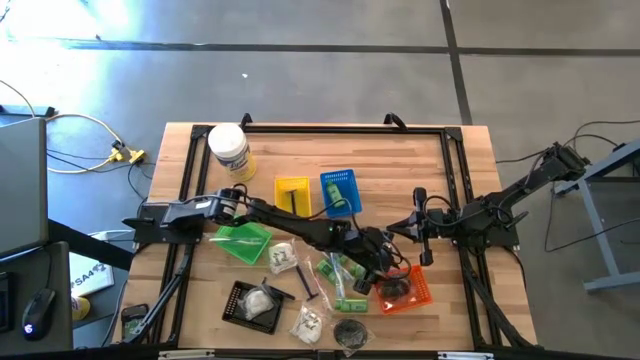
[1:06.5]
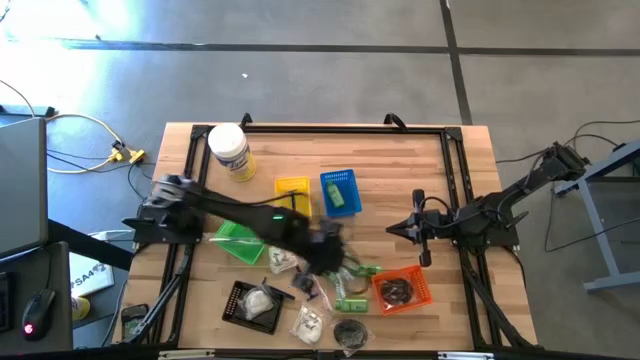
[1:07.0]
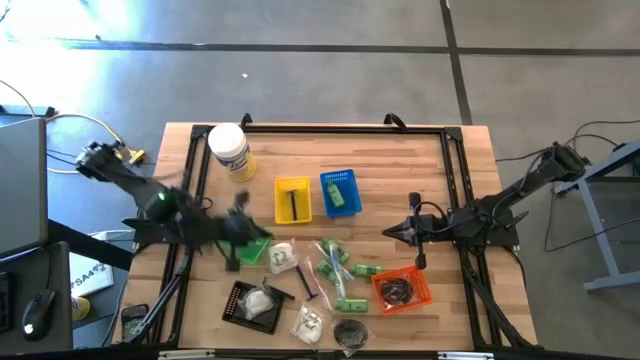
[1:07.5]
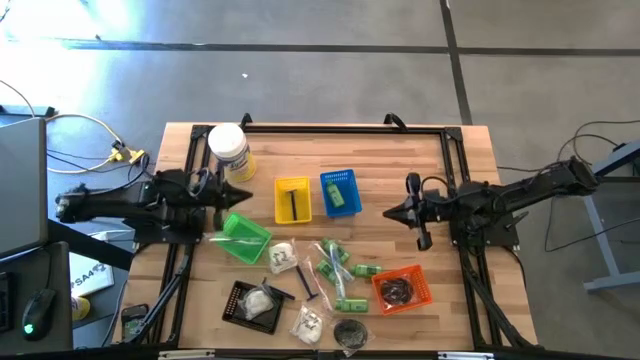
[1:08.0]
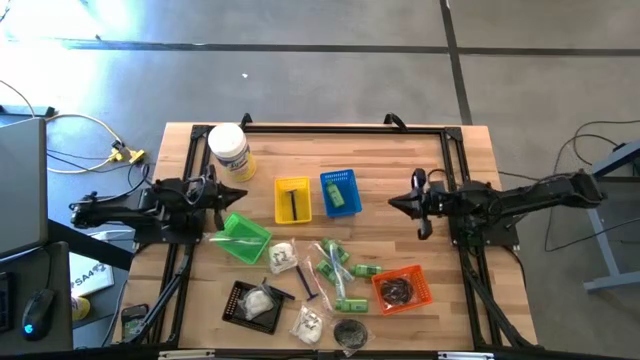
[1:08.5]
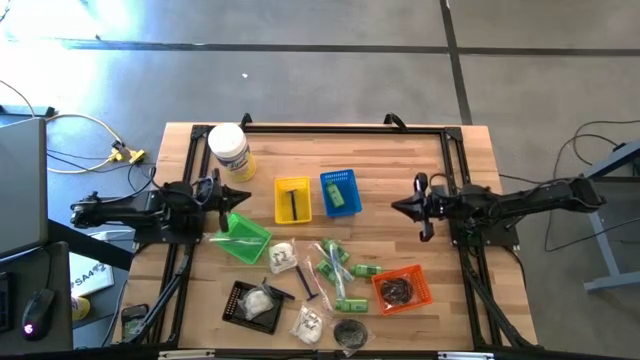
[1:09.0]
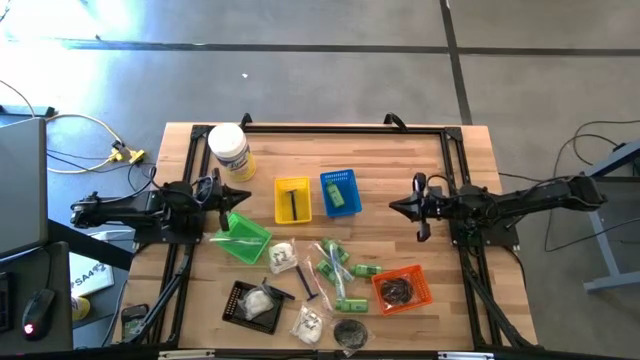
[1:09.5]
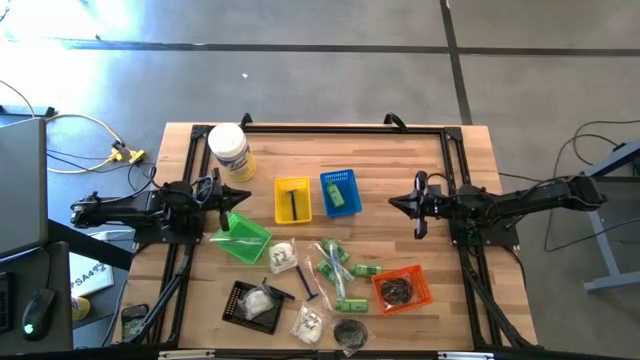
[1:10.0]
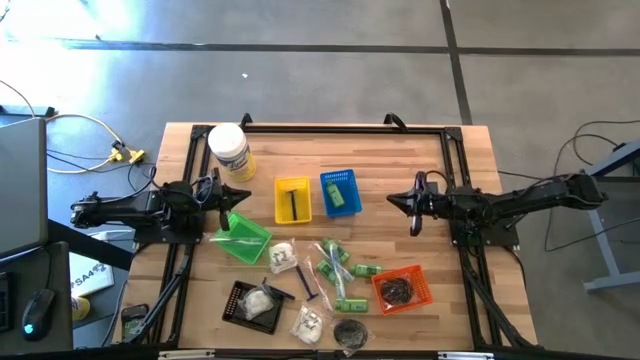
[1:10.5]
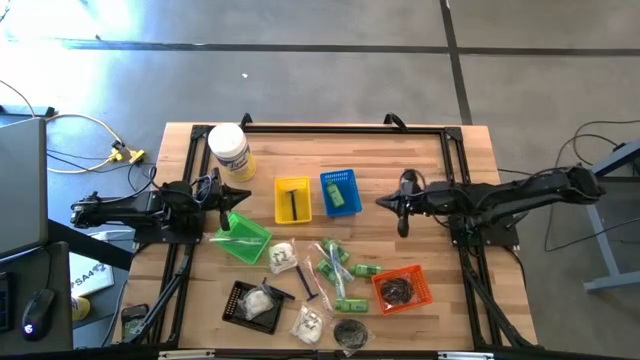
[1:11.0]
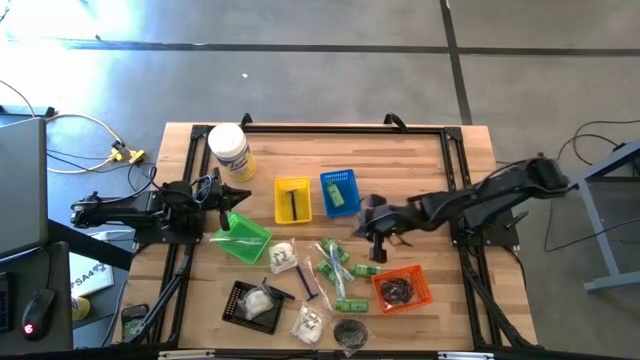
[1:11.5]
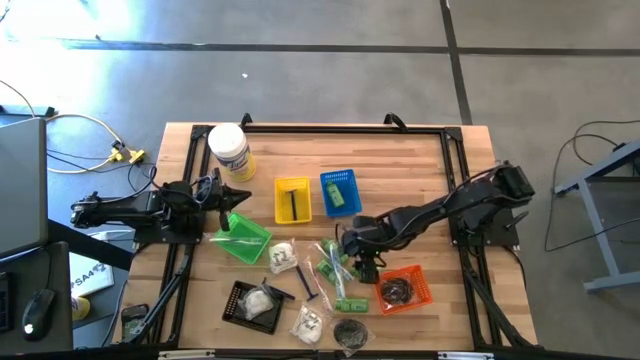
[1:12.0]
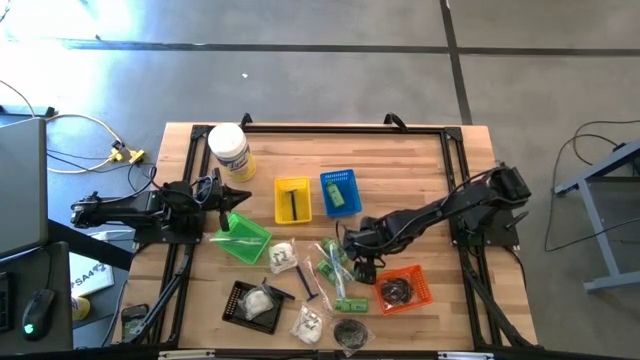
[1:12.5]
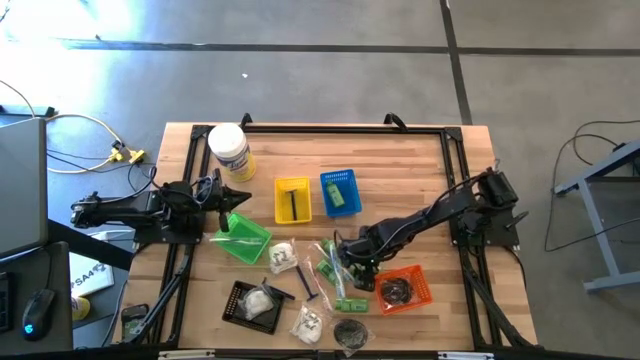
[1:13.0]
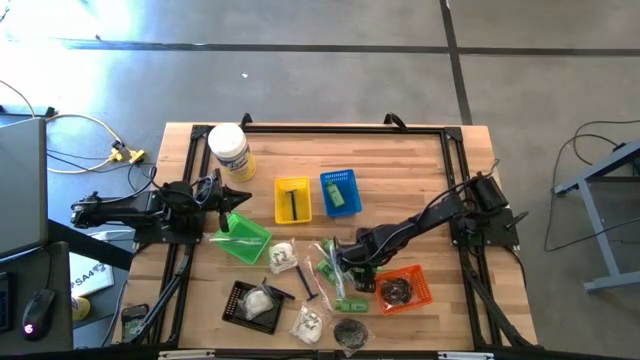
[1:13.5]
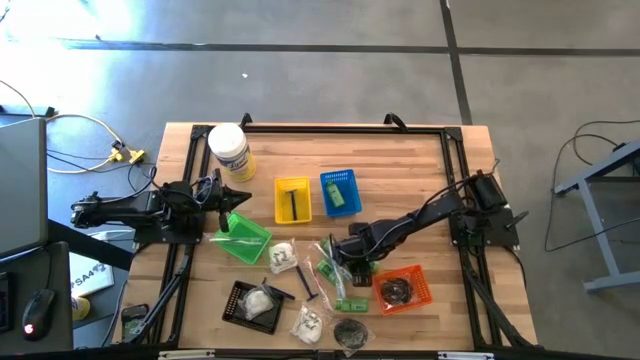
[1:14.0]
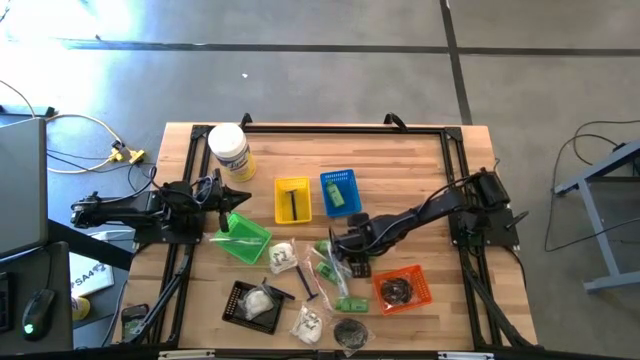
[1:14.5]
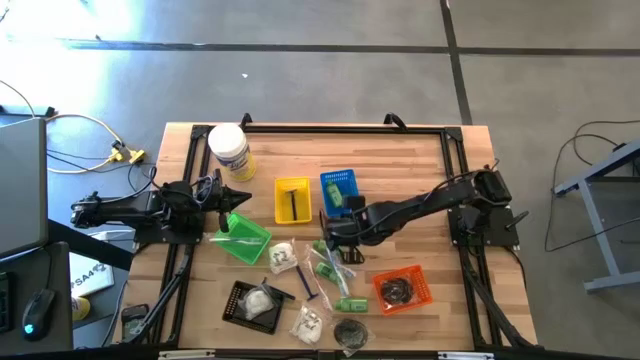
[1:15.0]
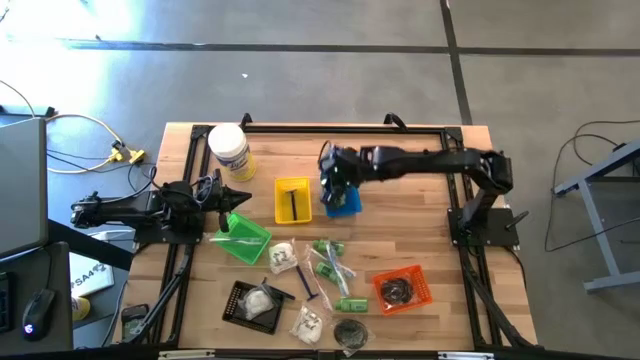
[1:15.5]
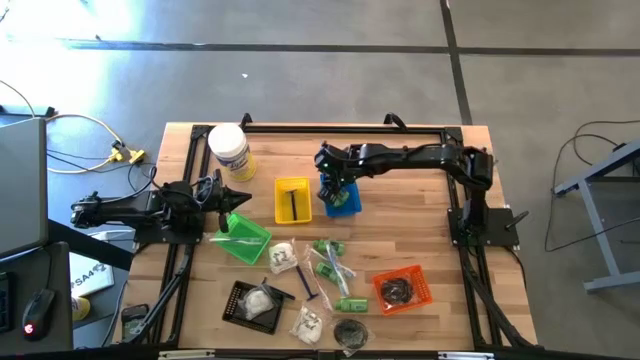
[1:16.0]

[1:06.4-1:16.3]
Task: Pick & Place Travel size toiletries
Put the shampoo into the blue bin

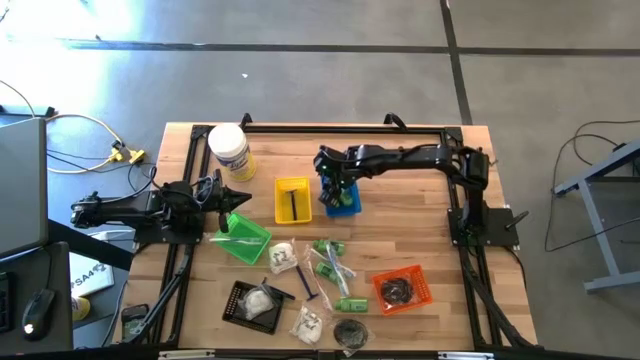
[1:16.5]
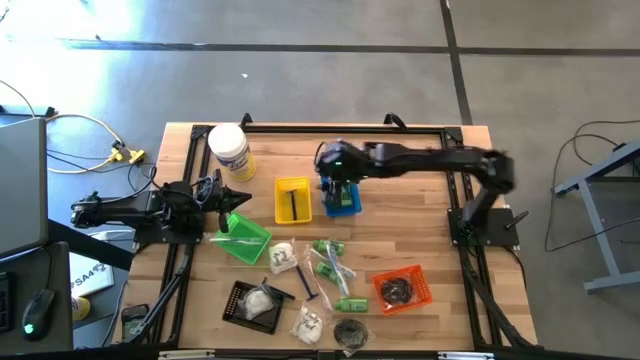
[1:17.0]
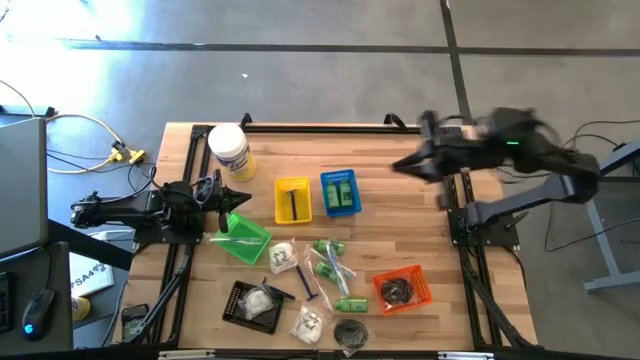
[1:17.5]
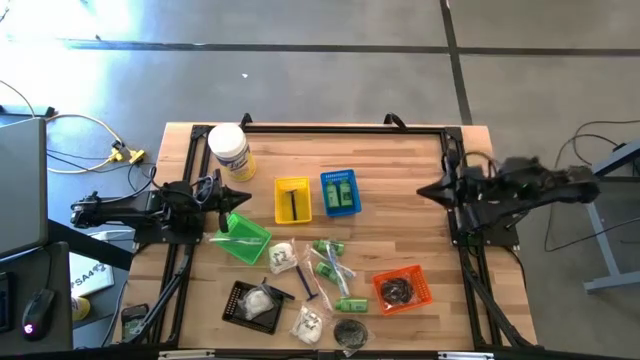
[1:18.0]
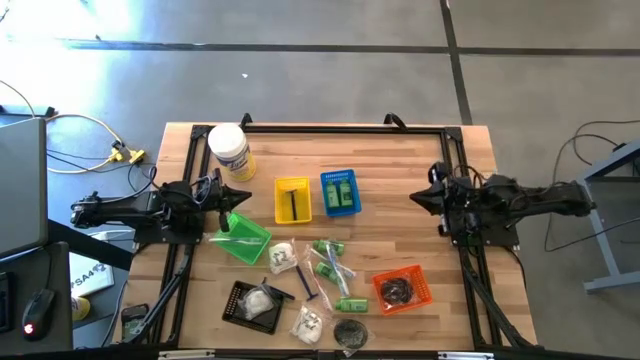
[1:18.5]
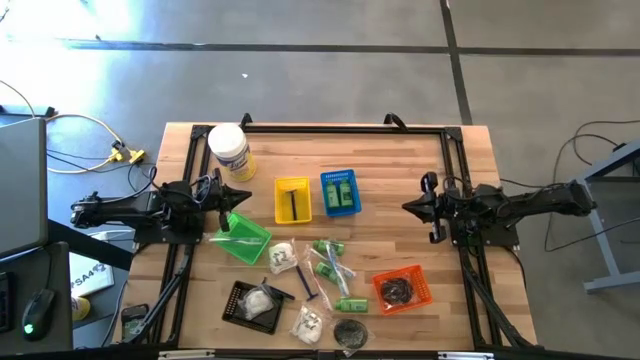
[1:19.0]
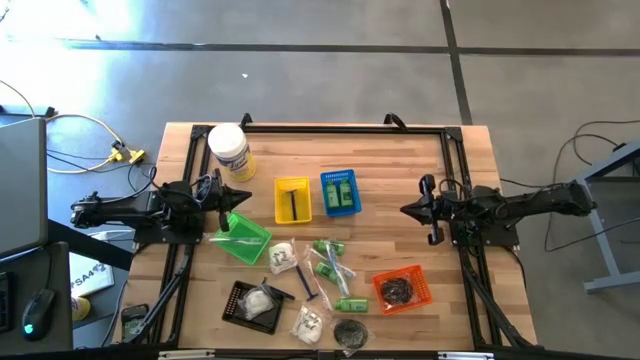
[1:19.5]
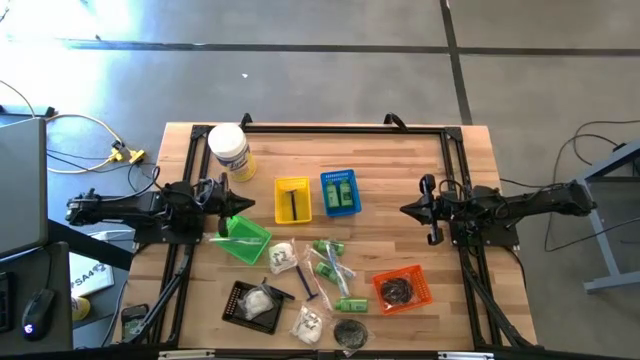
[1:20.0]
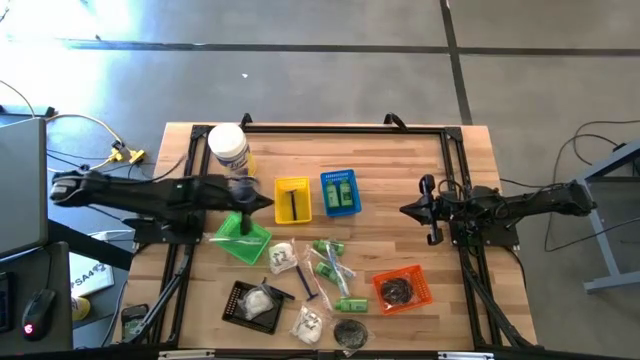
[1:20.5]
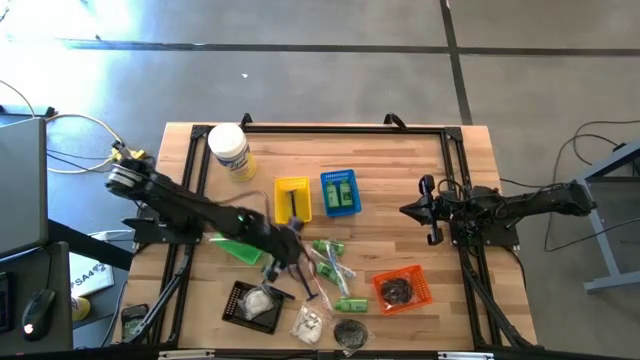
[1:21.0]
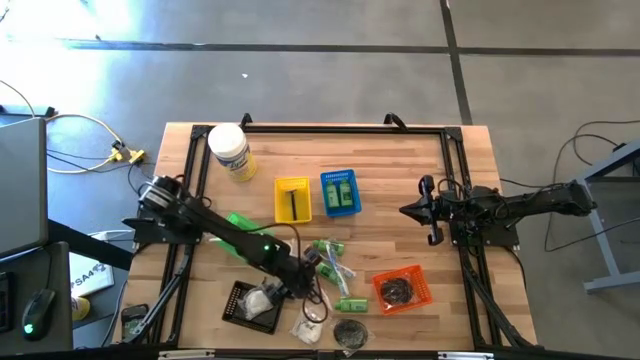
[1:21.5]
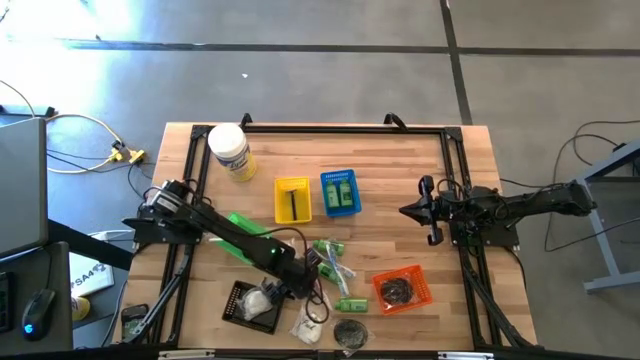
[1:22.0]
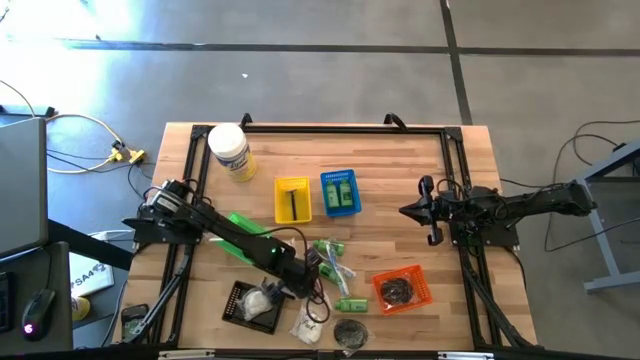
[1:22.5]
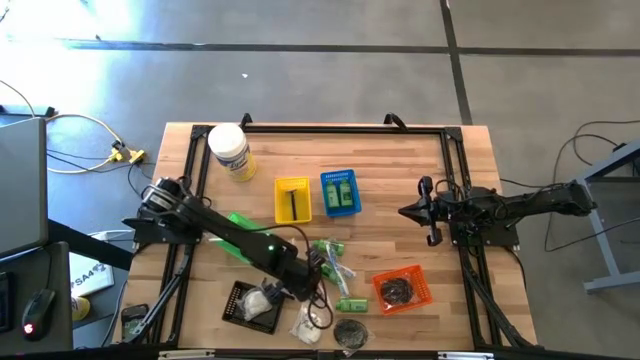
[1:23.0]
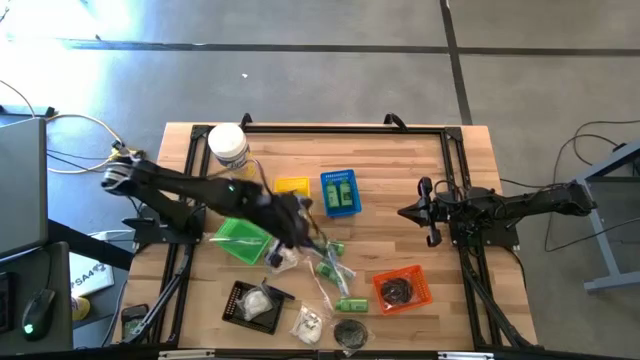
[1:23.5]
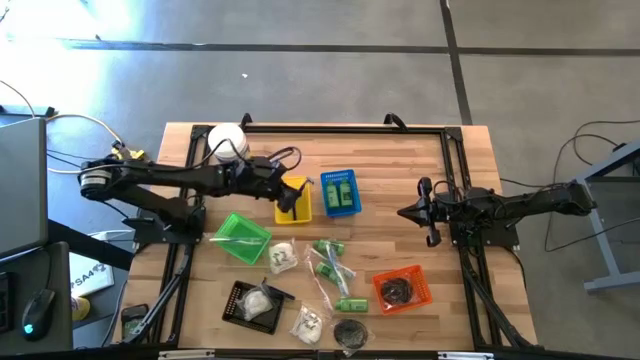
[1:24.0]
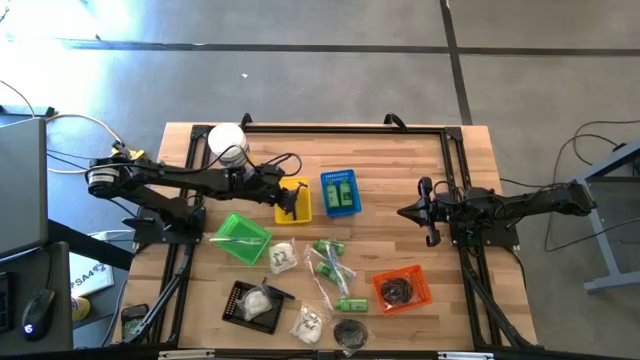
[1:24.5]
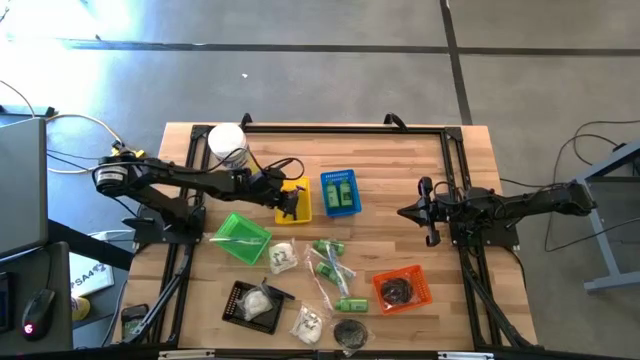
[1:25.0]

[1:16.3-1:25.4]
Put the razor into the yellow bin

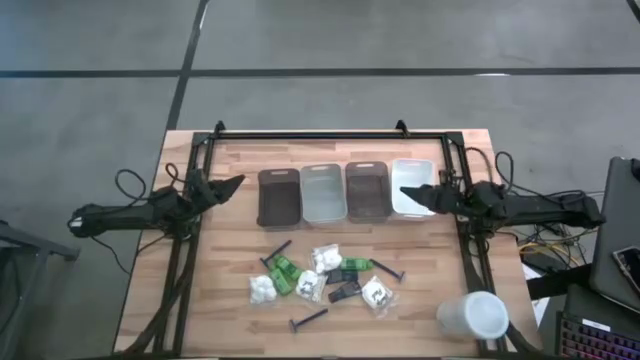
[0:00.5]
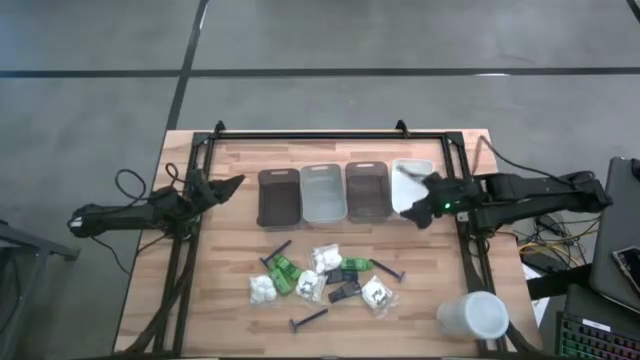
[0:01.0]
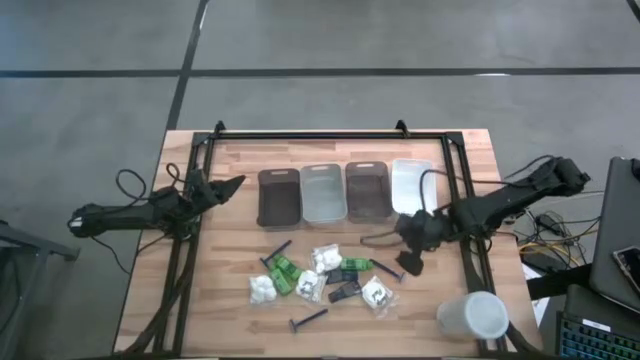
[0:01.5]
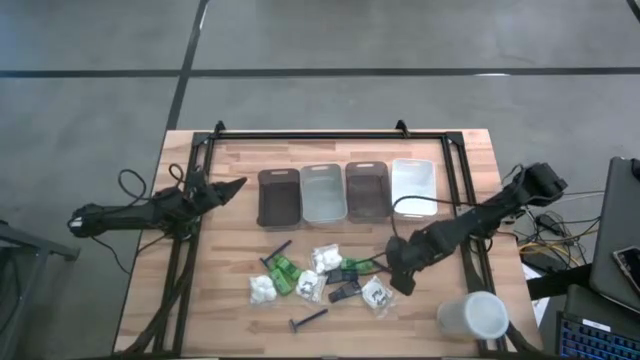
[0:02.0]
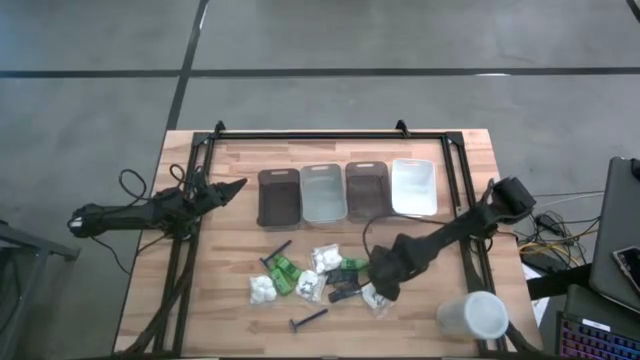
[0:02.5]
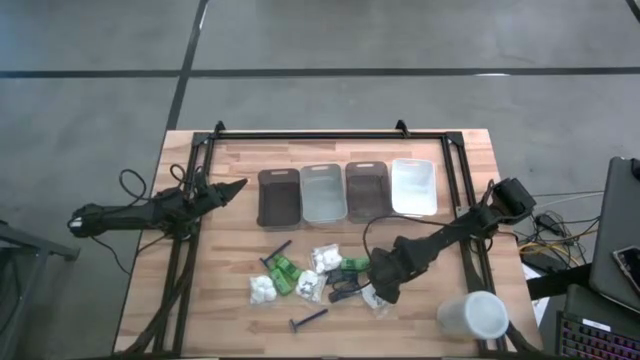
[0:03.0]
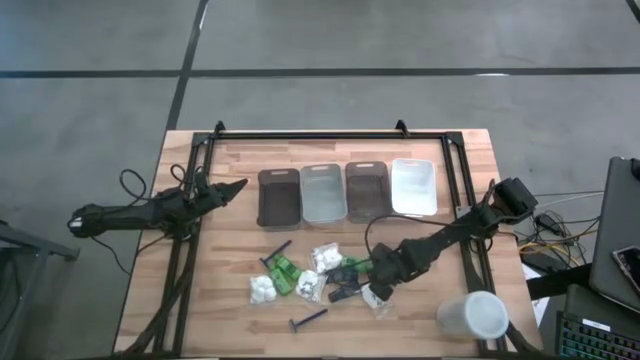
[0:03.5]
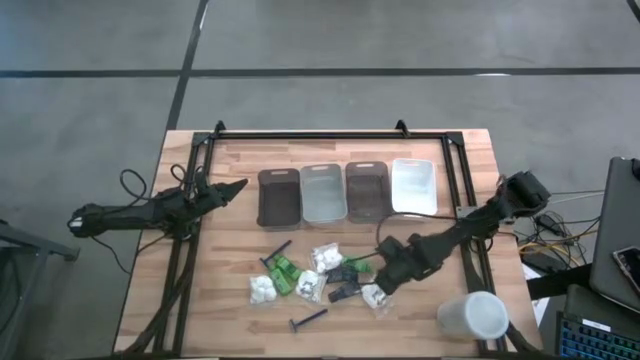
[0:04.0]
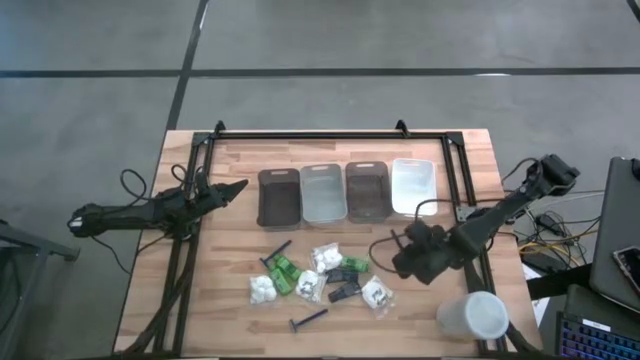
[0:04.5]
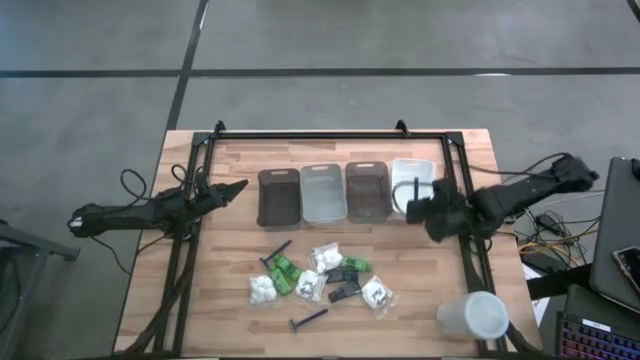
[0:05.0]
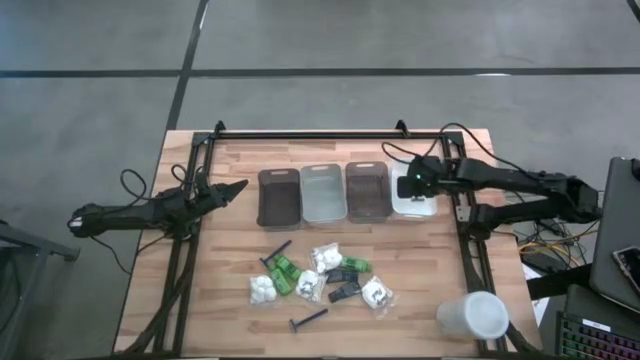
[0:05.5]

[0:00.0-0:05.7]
Task: Pick & Place Travel size toiletries
Put the right razor into the white bin
